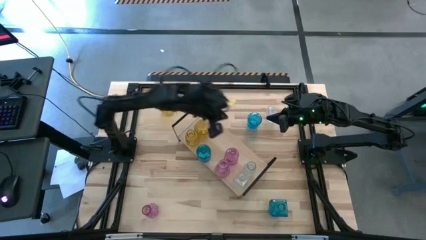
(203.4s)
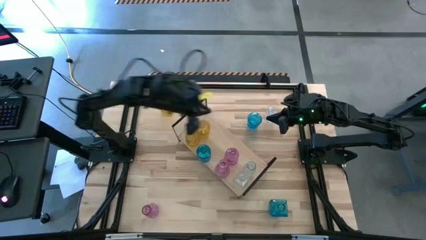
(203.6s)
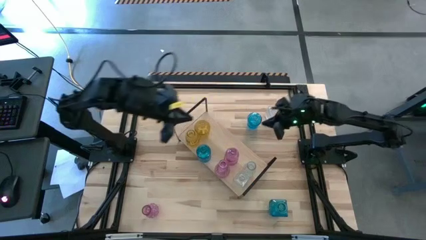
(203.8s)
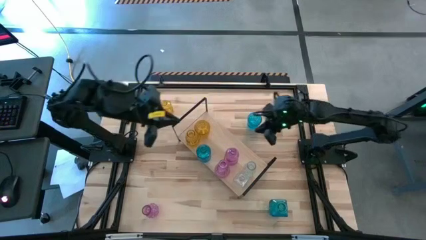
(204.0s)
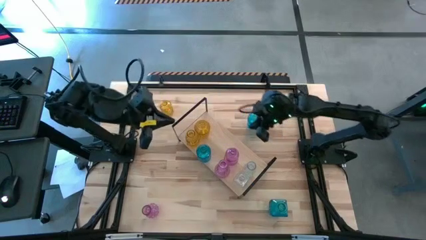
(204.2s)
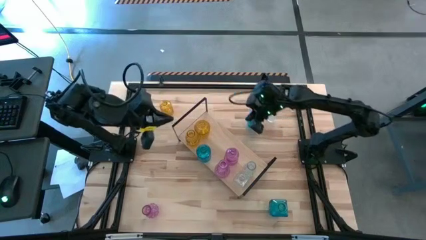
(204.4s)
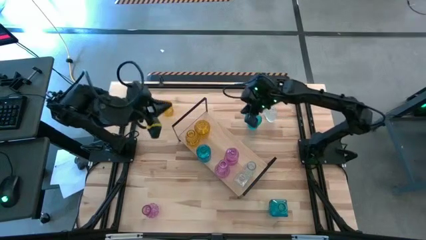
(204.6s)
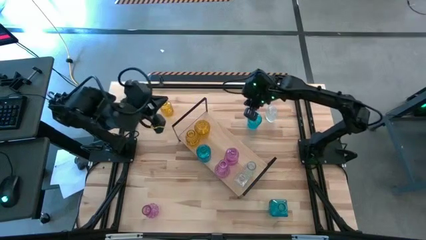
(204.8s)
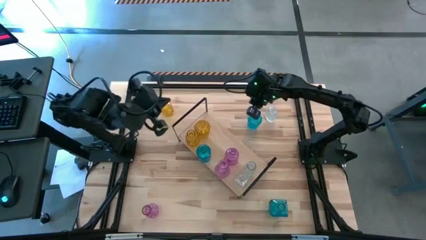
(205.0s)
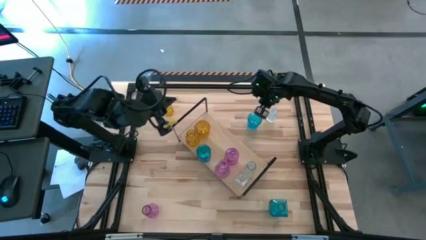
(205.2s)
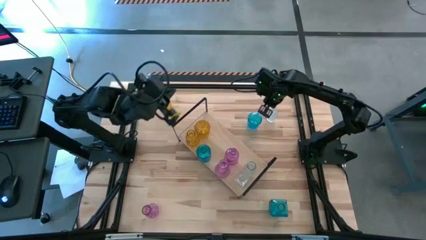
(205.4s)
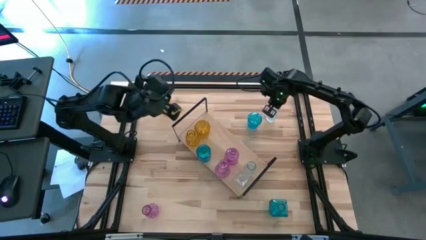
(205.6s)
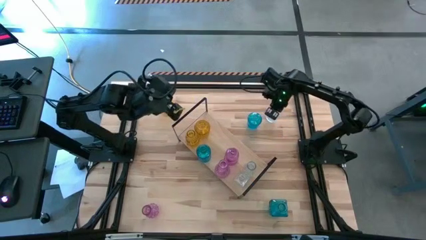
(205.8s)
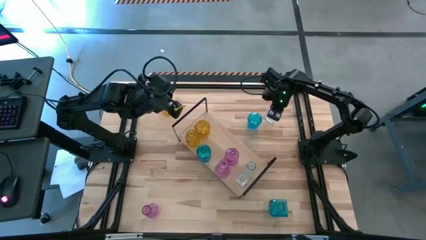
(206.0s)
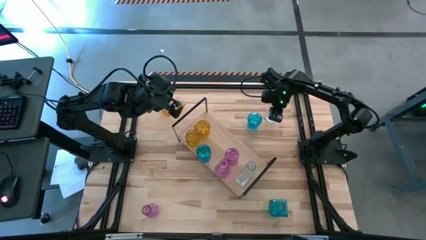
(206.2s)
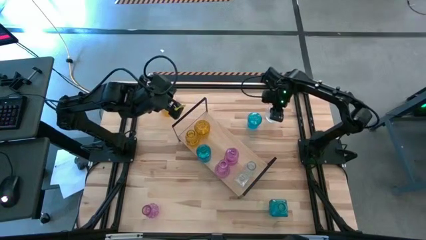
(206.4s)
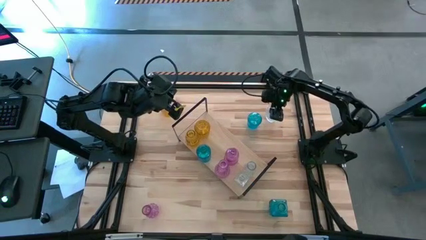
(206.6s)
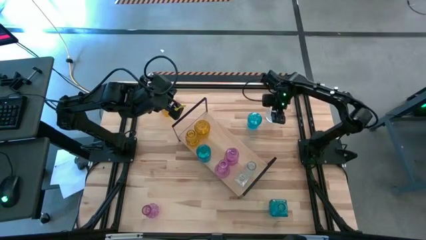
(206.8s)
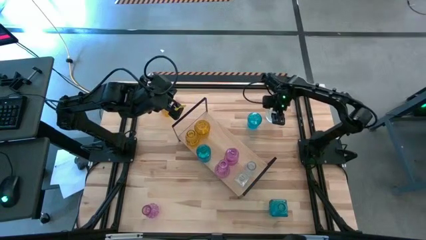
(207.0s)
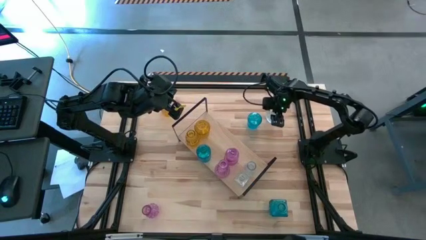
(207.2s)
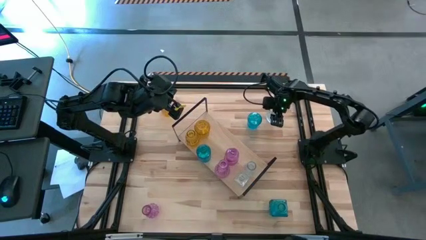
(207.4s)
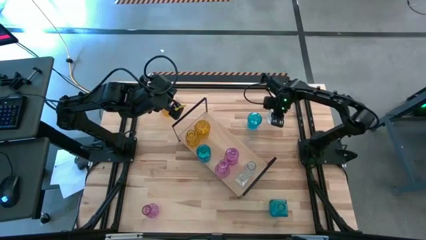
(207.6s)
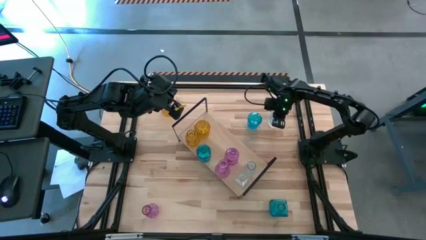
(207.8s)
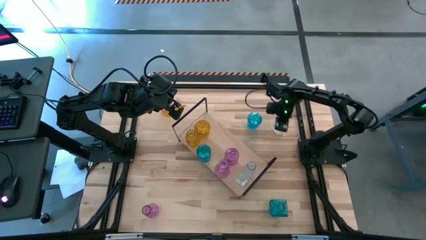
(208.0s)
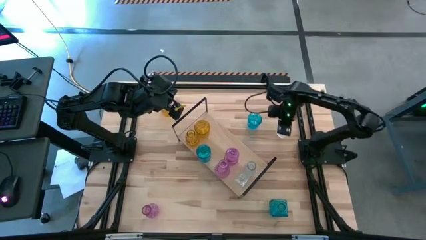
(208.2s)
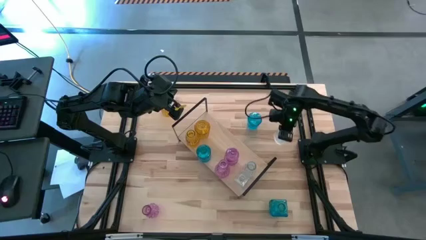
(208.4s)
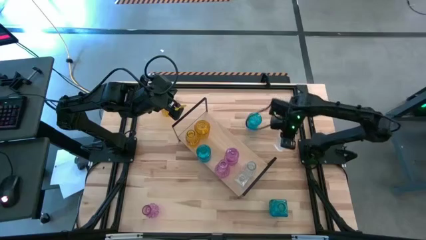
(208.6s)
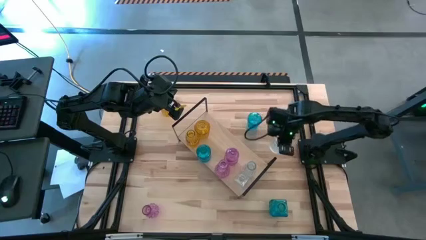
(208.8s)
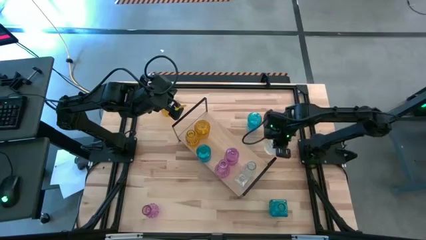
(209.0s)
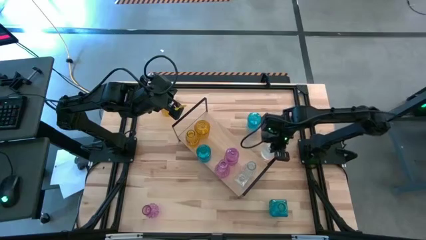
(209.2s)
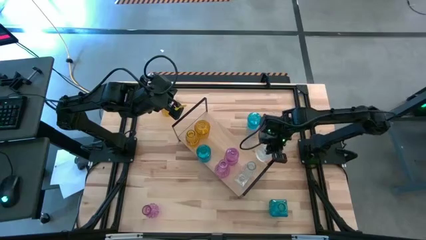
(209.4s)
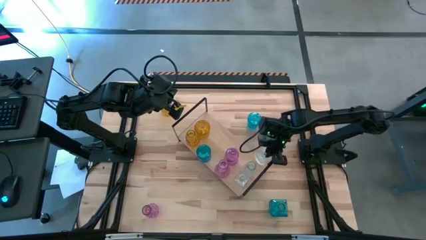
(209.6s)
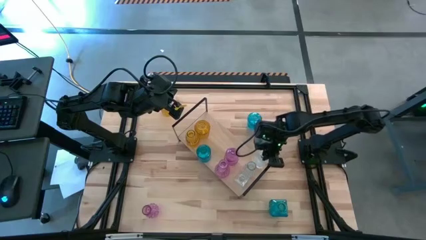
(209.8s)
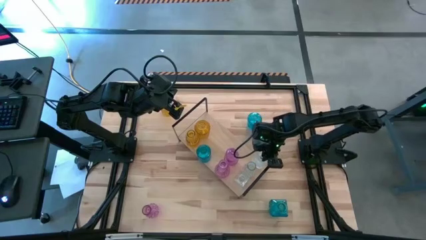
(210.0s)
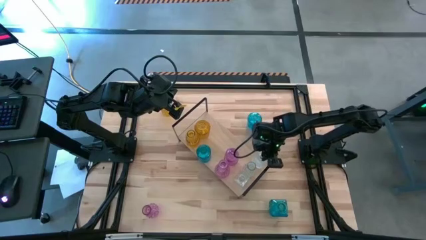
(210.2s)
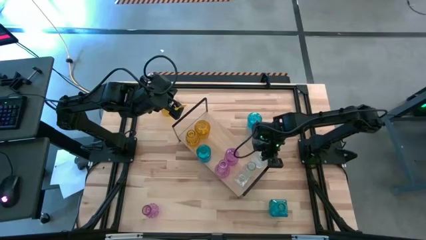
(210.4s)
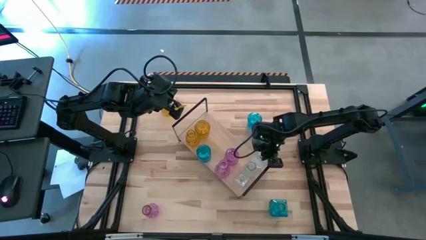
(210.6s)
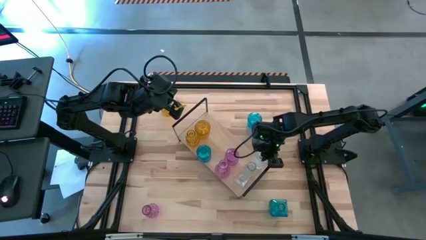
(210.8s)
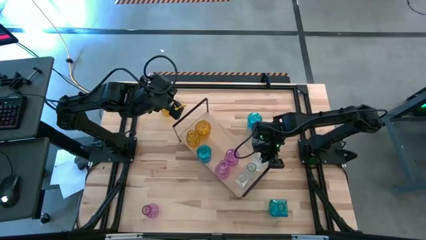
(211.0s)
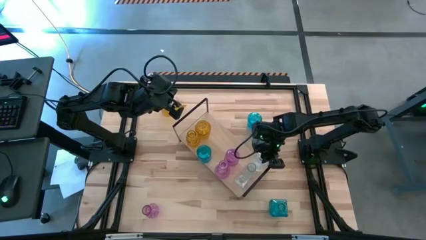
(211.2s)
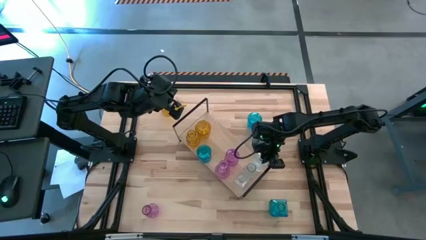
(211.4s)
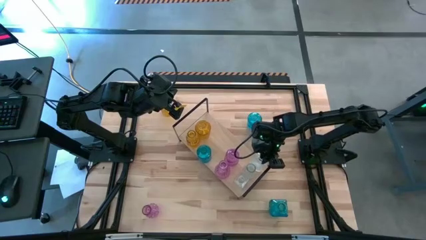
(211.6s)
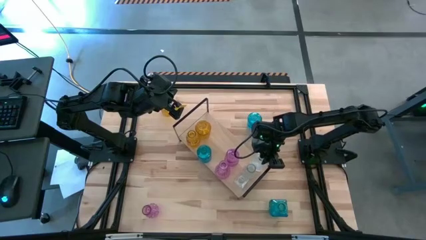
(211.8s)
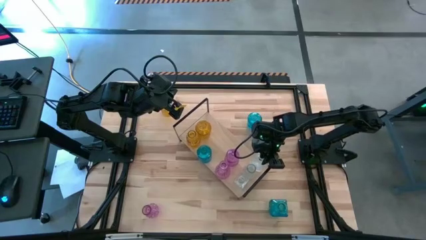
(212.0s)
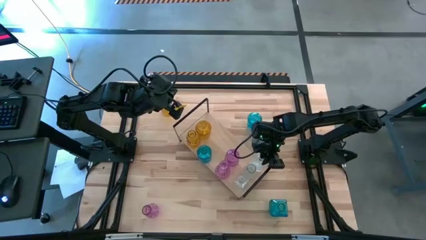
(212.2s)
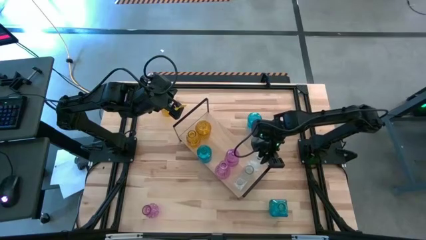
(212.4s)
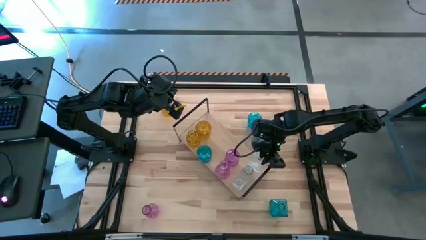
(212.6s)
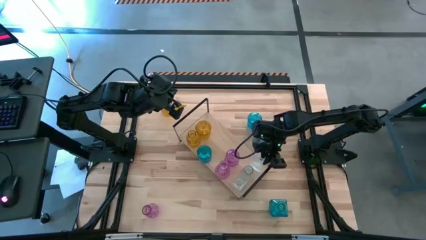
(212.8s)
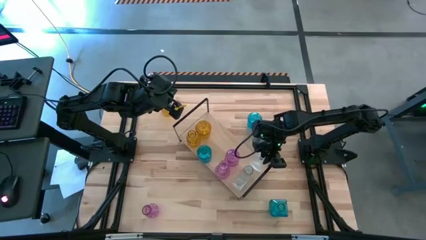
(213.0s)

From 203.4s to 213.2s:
Task: sort vases onto shelf
Put the crystal vase on the shelf

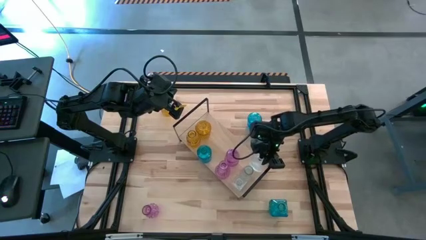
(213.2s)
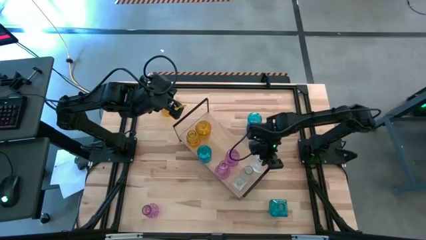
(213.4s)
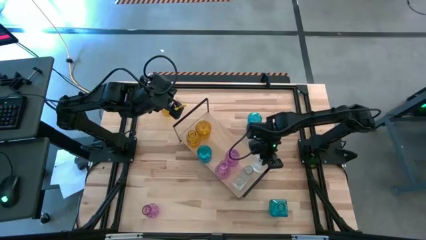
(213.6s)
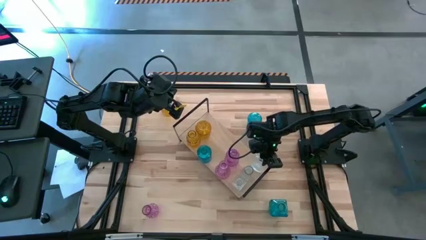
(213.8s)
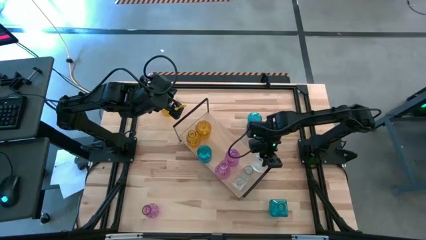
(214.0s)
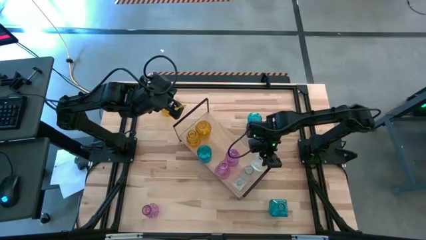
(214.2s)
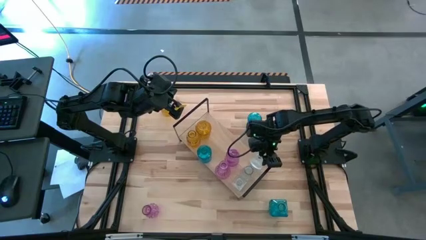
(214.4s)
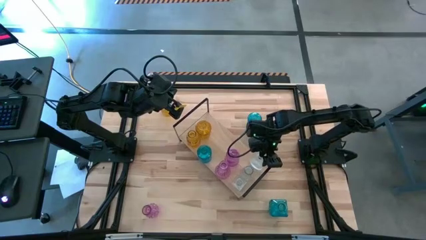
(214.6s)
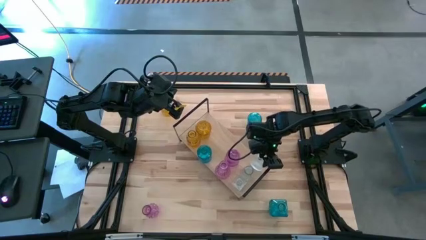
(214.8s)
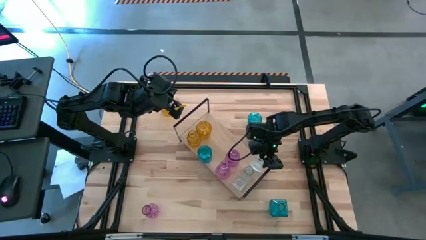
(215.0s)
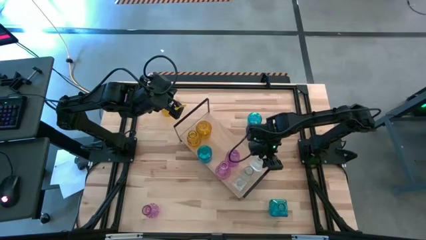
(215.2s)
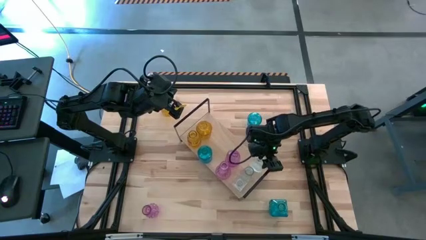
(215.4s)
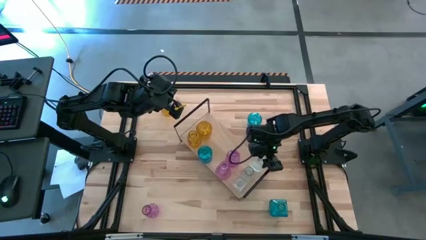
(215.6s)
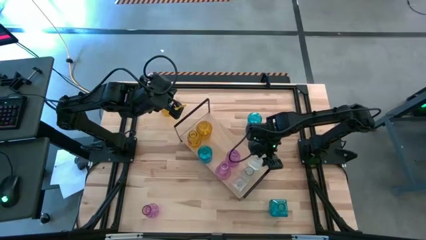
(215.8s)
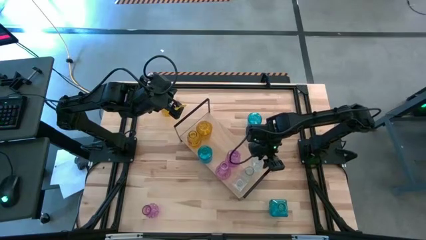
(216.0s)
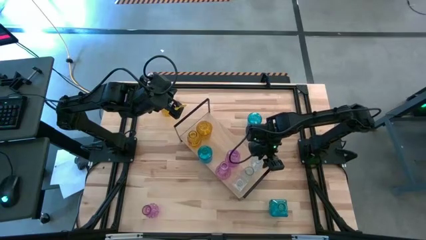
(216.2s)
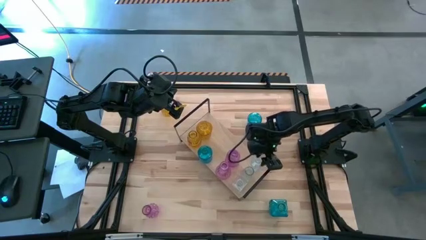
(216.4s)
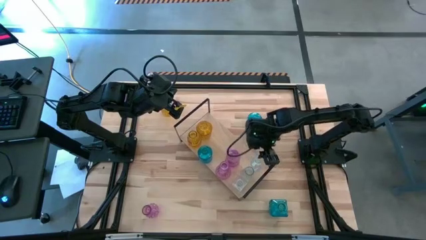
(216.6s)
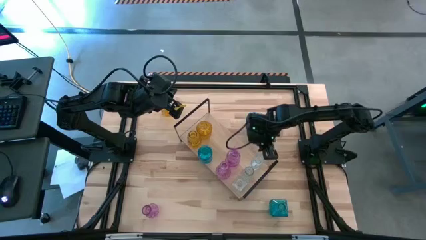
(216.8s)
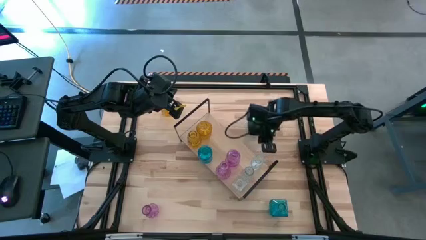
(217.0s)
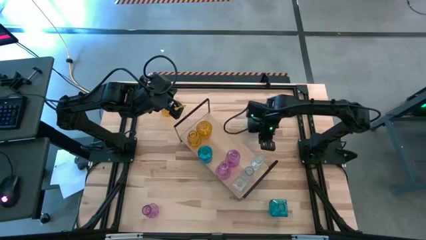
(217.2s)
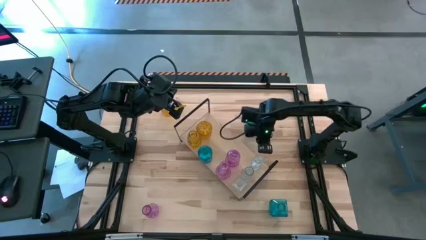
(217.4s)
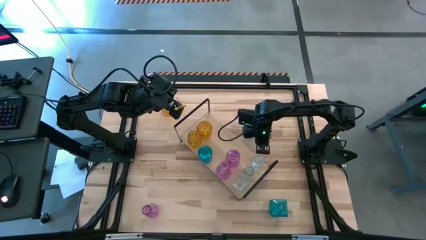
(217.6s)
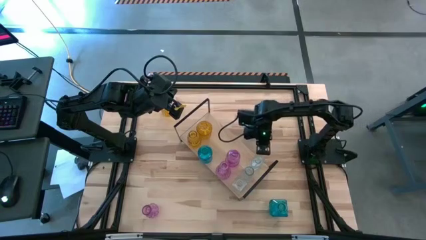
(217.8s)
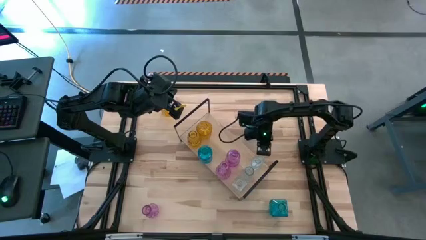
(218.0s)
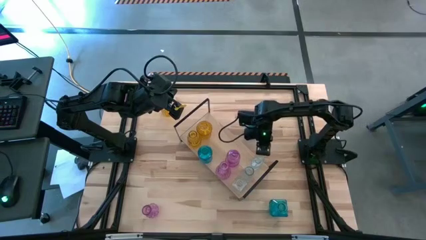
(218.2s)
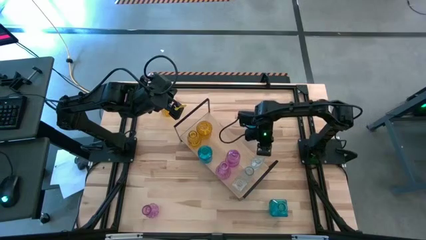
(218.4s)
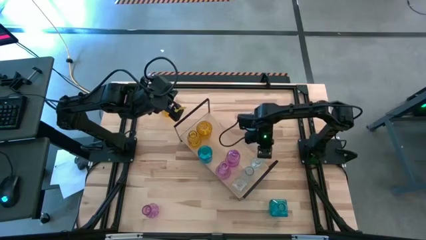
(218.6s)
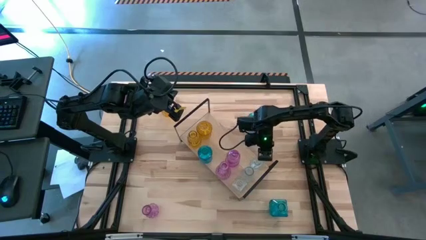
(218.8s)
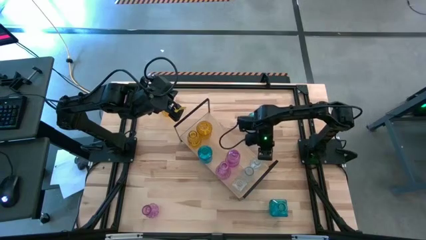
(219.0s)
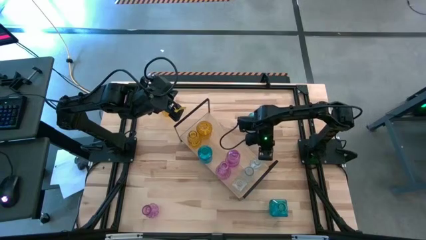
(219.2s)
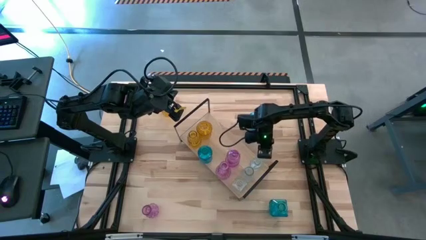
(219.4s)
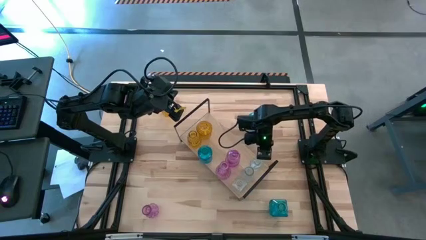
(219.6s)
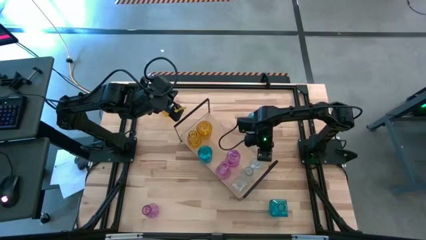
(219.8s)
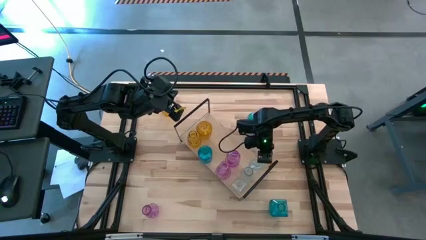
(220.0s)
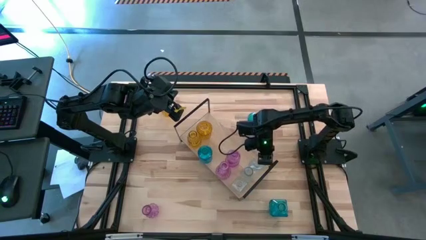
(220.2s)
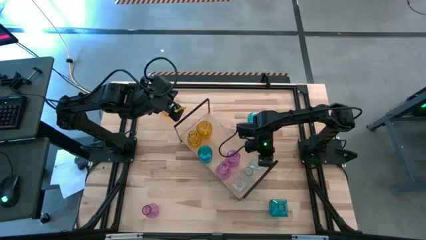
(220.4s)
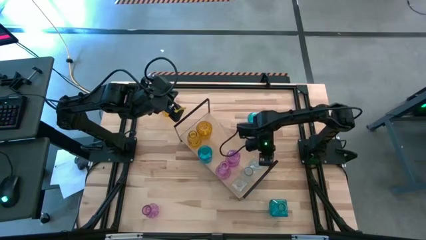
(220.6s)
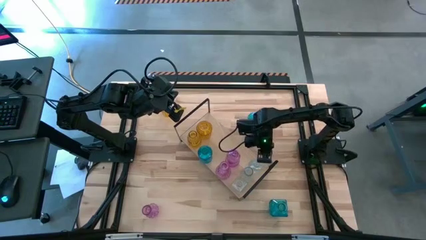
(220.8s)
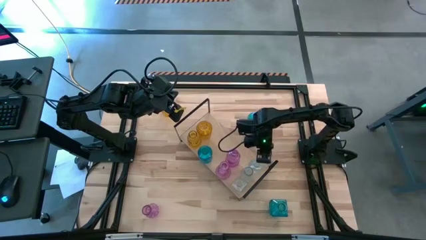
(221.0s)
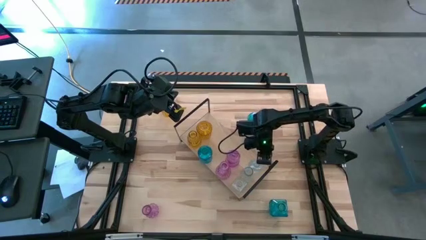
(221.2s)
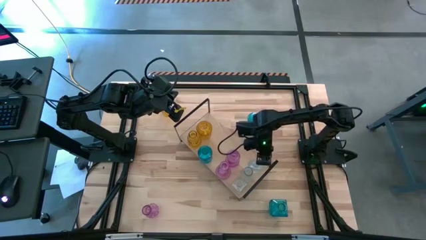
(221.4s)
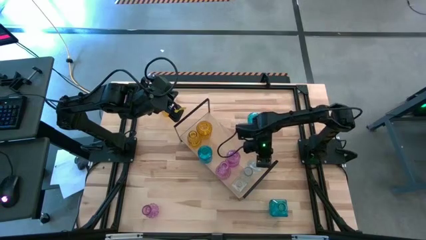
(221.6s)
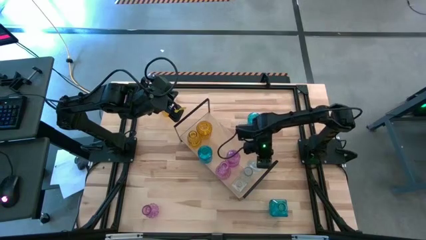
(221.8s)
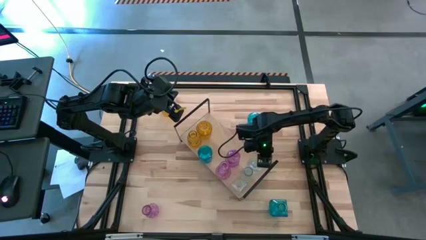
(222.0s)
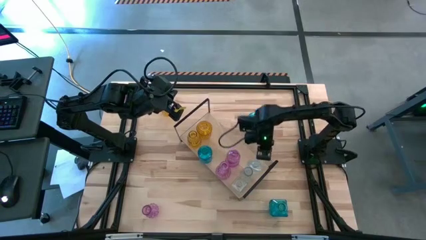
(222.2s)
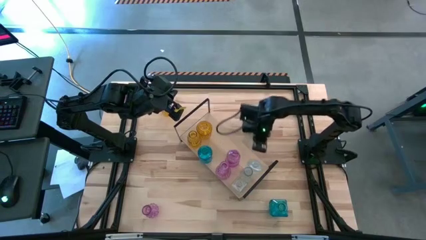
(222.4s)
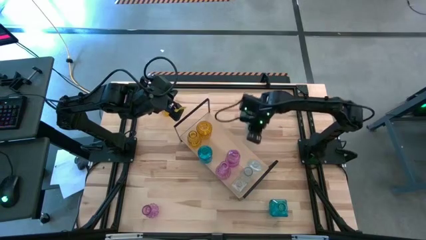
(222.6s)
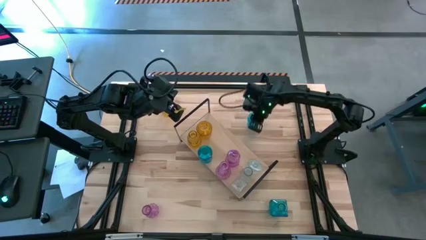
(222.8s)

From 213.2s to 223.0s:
Put the crystal vase on the shelf
